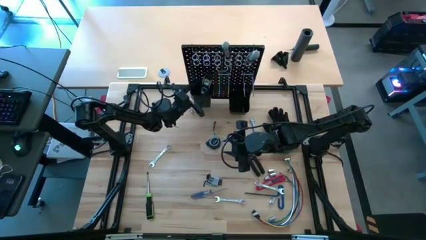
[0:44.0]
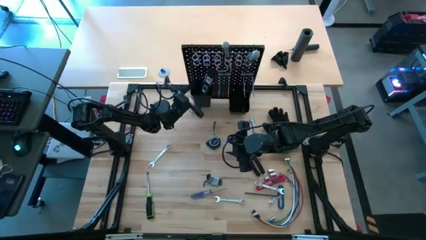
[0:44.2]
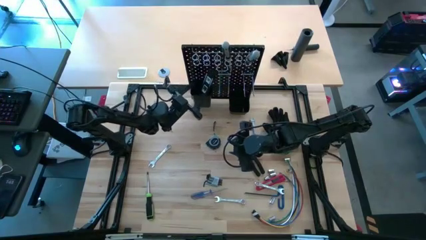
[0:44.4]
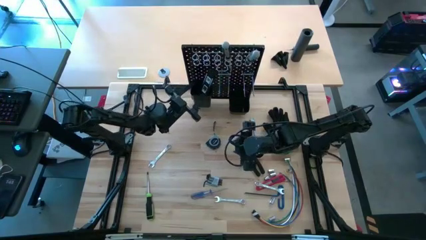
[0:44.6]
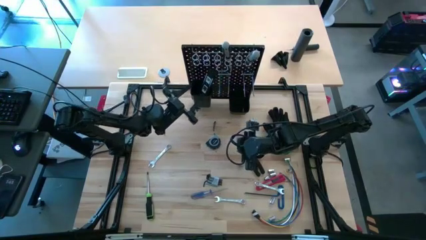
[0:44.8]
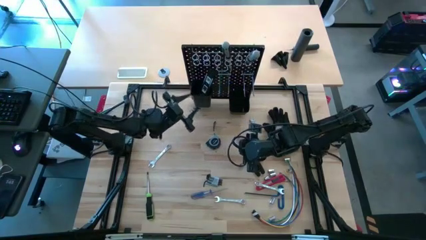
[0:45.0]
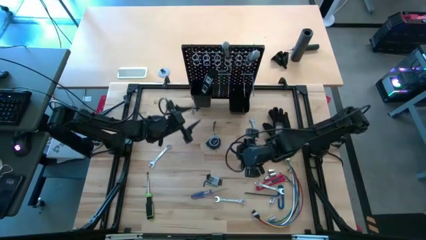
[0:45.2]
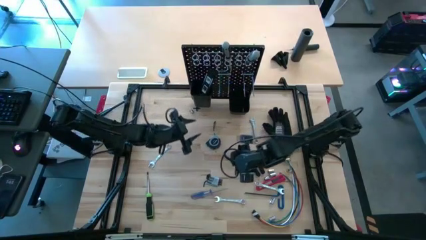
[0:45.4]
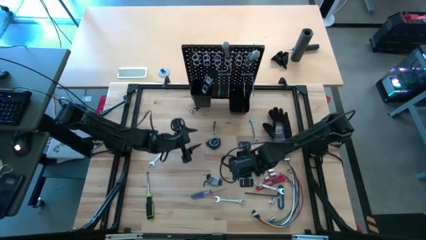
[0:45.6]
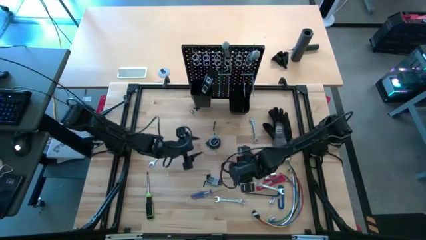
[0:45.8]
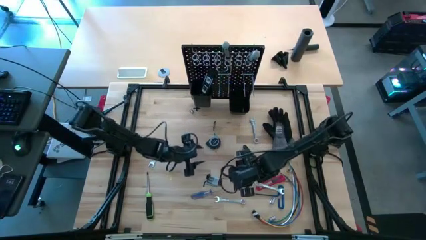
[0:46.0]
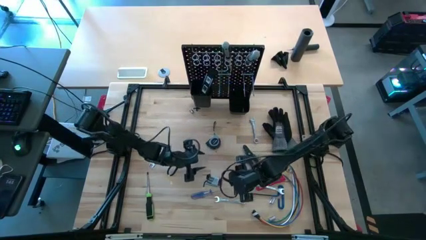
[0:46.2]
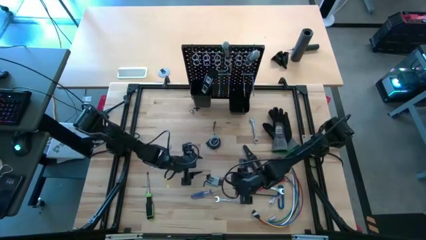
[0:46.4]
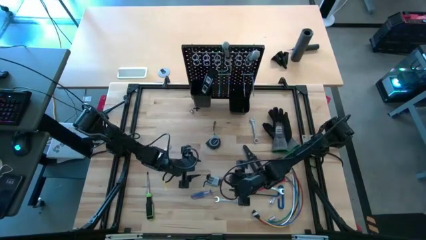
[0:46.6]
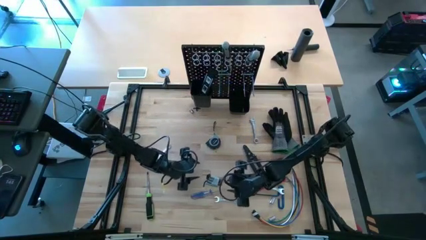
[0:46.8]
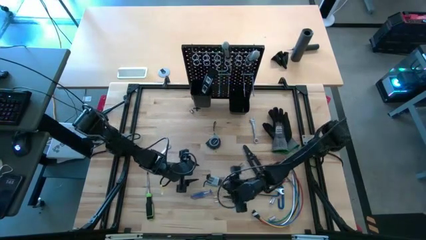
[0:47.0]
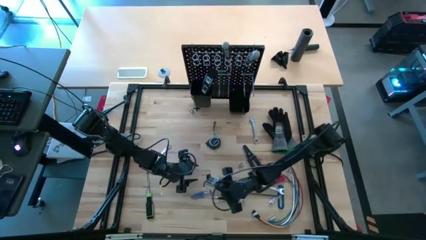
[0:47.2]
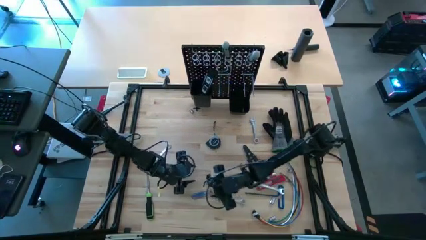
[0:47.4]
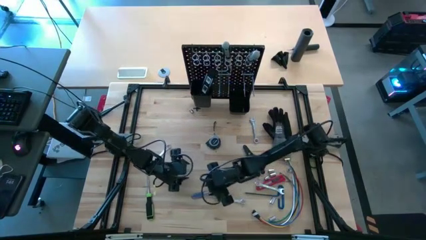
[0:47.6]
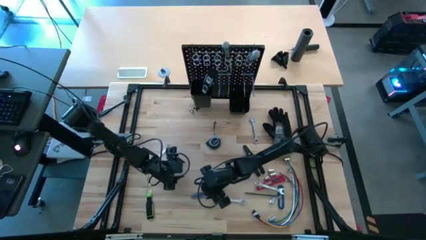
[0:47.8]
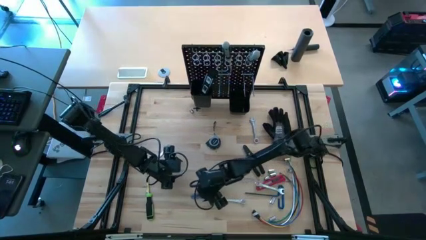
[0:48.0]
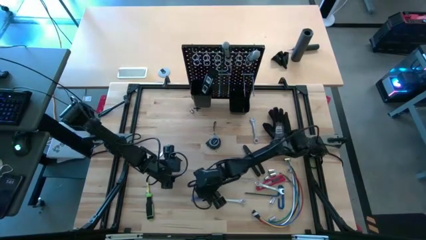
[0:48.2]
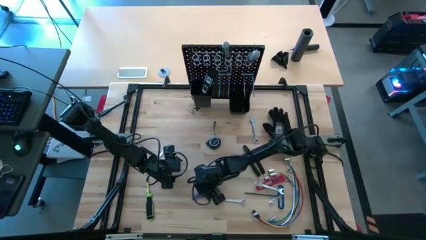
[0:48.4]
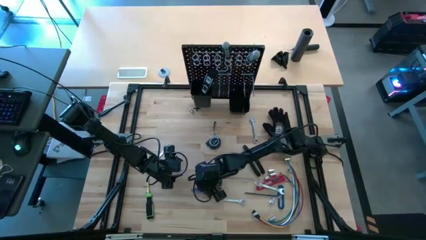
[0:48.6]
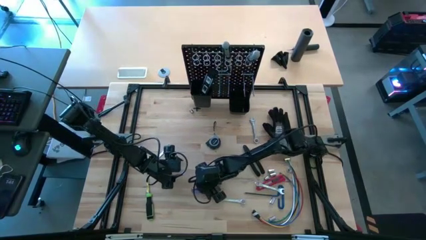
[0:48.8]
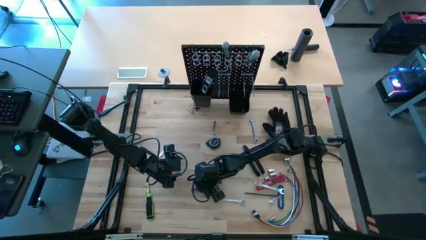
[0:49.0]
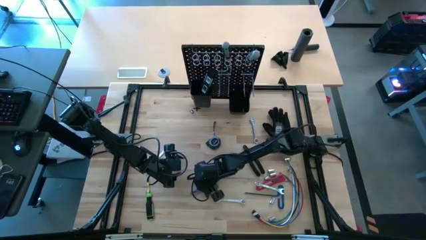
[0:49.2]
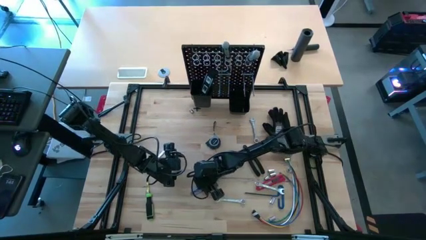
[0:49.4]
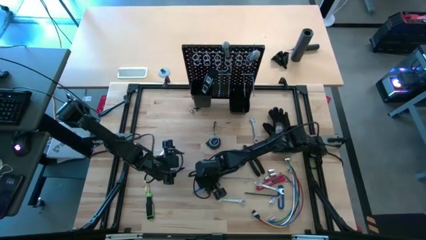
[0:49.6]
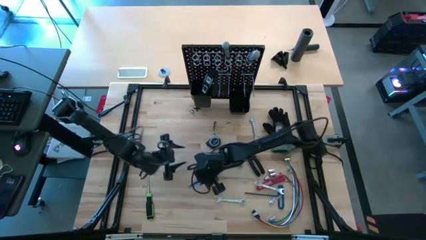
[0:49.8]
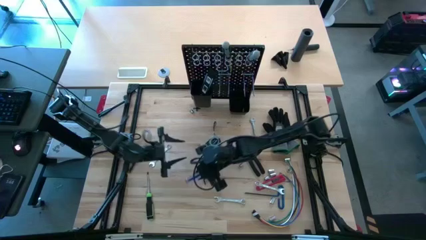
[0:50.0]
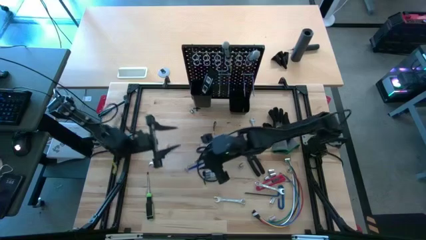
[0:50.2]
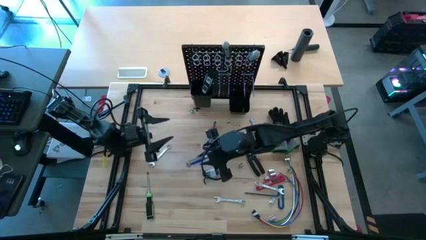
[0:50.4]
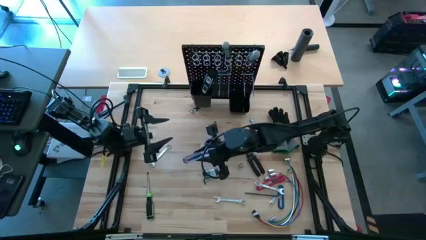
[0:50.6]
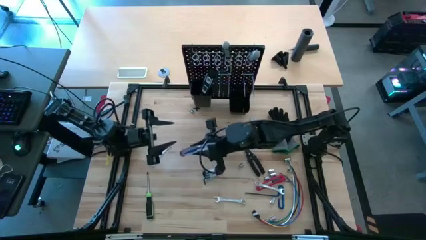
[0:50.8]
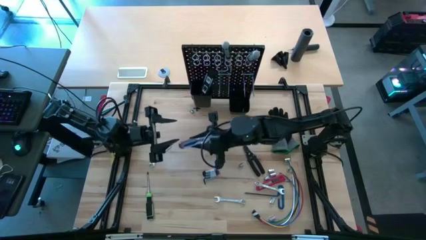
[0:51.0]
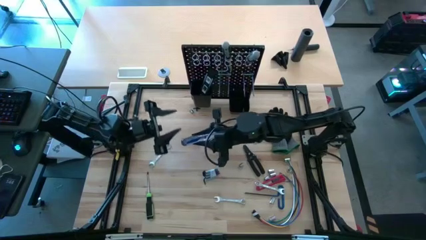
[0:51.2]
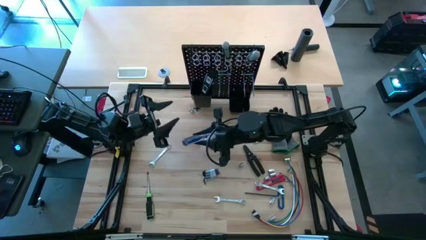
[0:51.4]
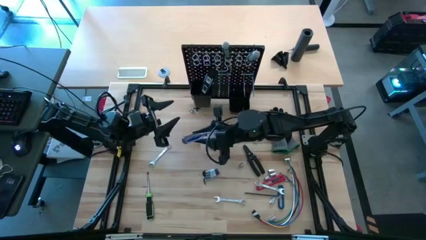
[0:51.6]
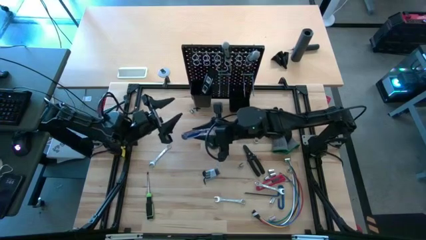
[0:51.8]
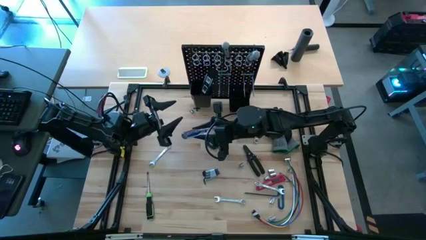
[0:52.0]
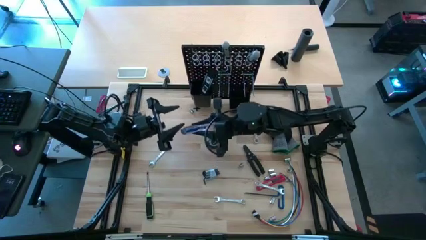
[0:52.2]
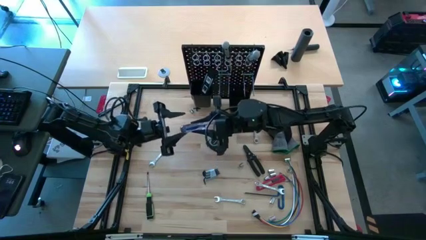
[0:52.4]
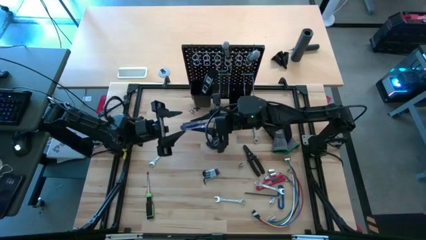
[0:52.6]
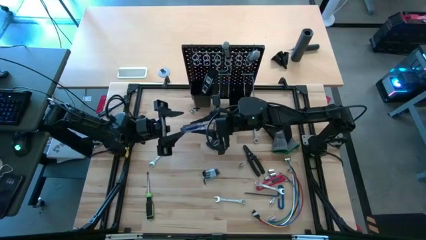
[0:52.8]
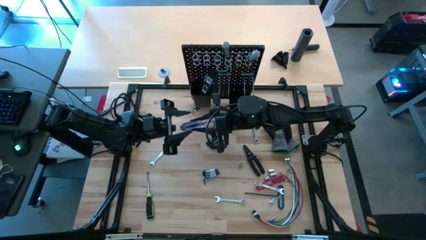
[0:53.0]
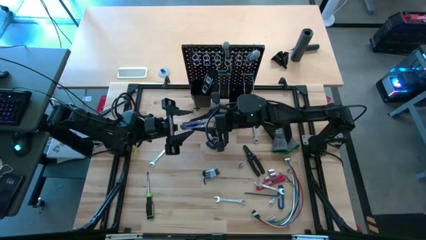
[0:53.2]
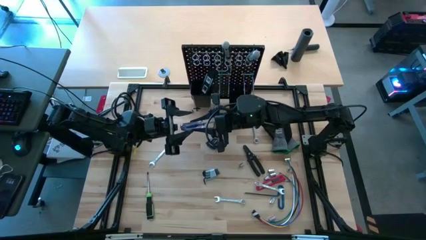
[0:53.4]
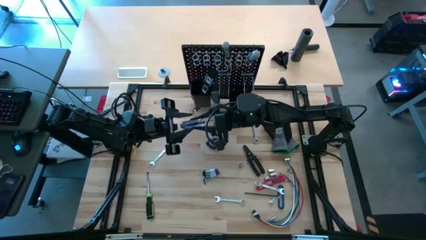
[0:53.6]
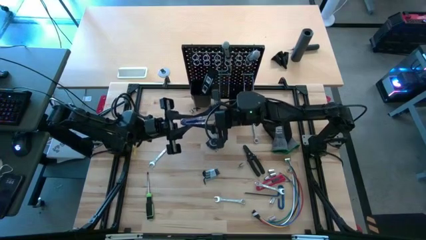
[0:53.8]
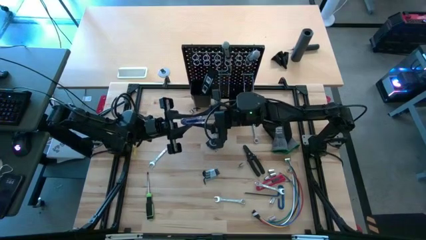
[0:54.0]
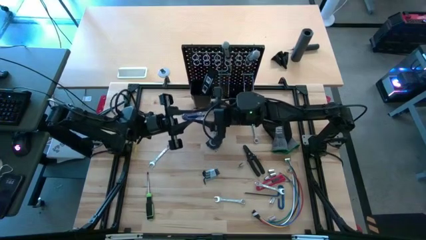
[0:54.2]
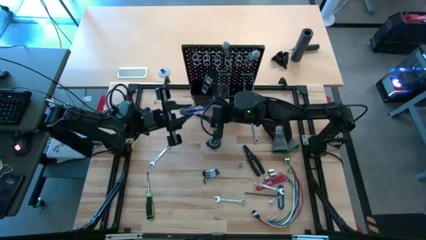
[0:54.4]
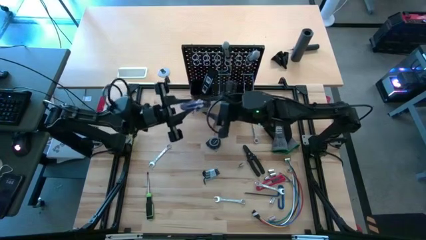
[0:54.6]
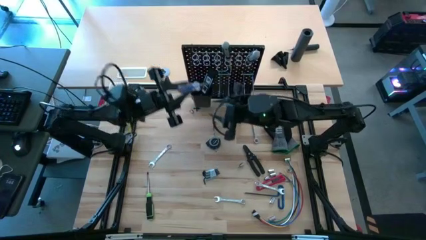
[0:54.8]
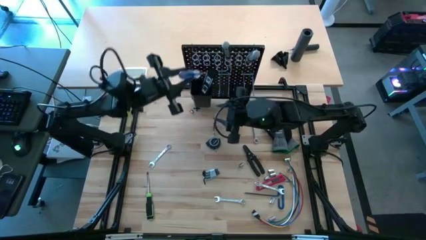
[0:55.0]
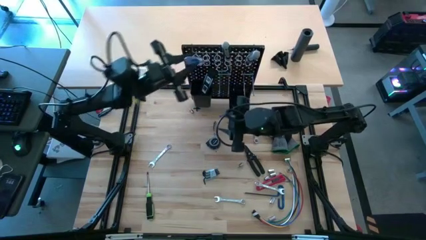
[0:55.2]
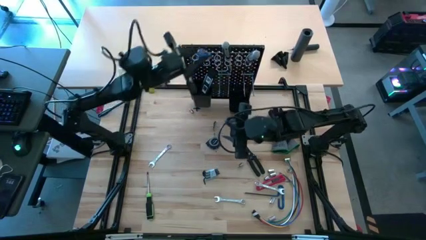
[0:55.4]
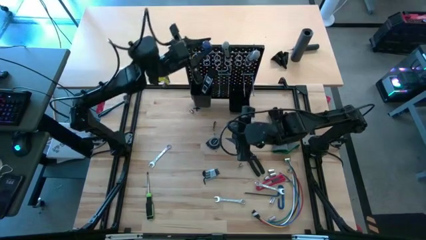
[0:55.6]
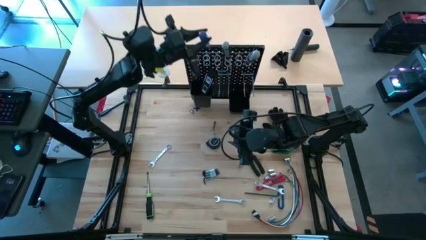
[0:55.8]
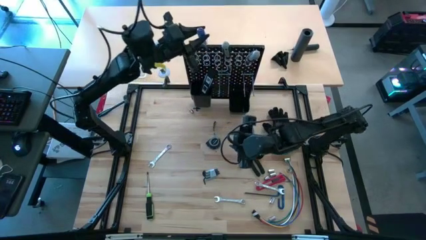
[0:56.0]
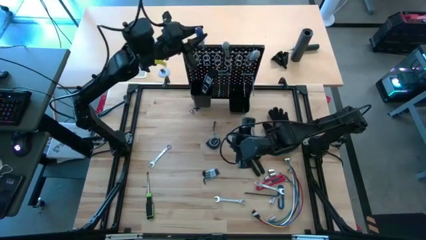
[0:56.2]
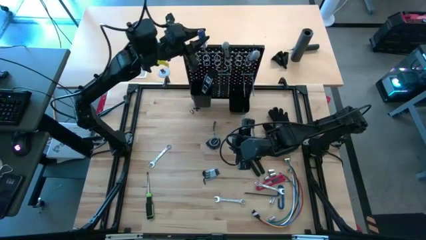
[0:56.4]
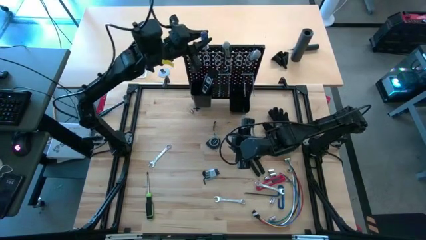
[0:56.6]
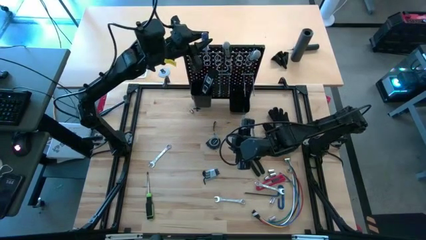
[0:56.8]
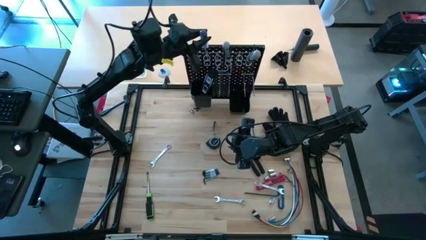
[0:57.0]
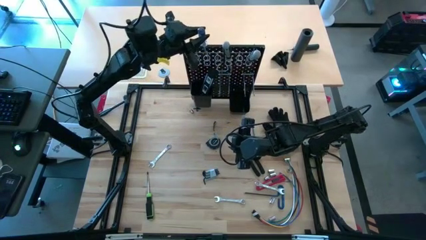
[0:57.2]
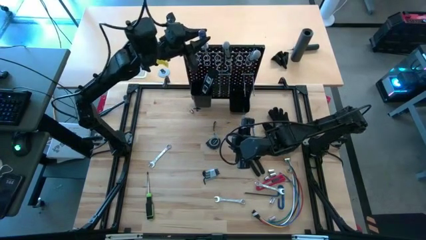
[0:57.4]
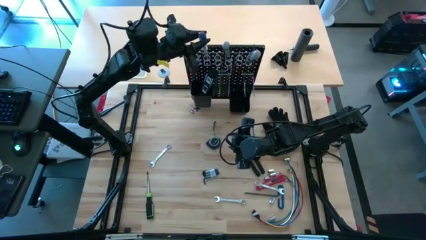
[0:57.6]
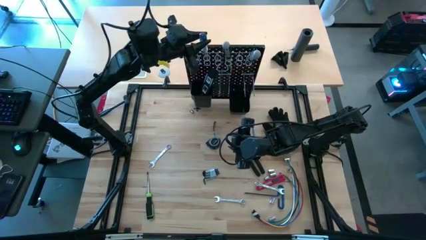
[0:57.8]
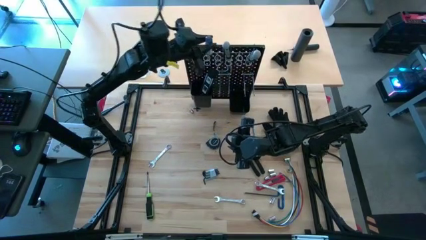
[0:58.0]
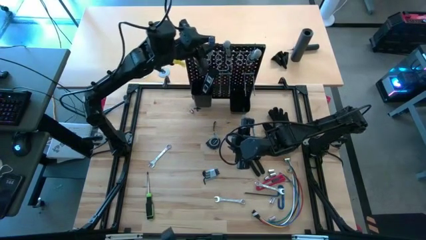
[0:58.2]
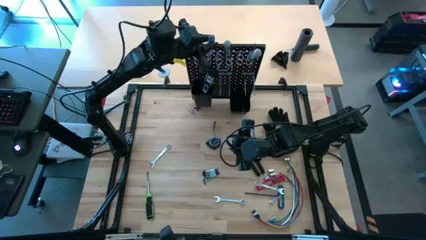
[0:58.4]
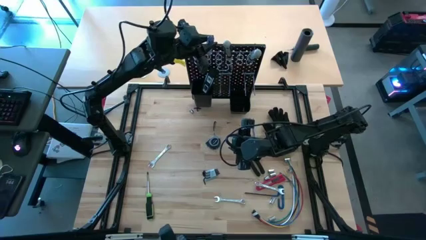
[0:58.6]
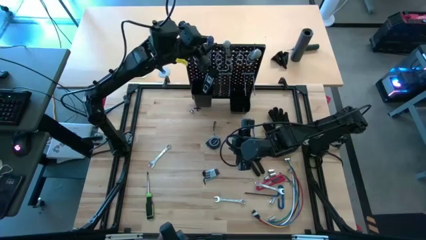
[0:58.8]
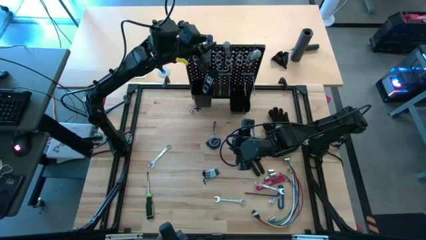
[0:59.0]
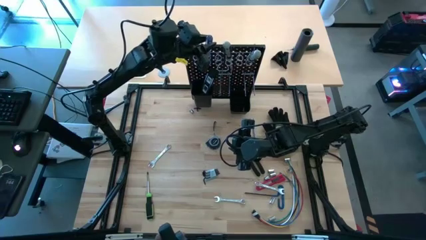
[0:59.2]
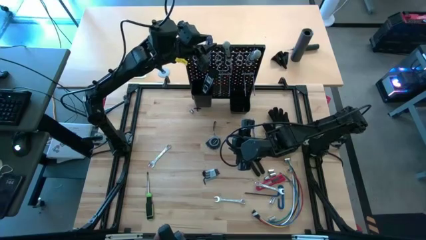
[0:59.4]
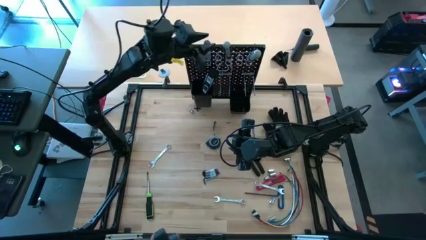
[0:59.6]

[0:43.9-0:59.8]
Task: Hang tools onto peg board
Hang the blue screwdriver on the peg board
